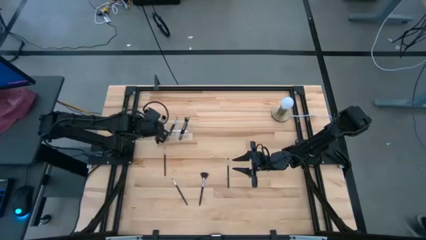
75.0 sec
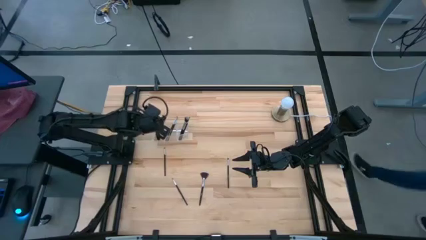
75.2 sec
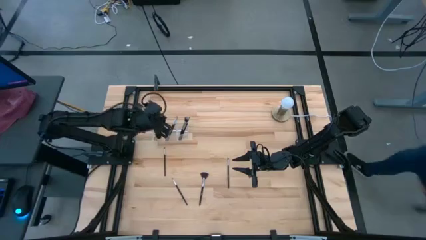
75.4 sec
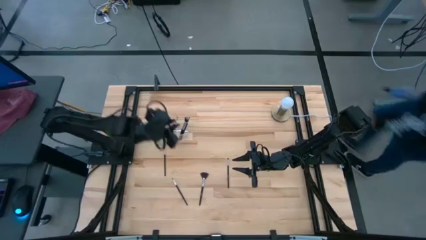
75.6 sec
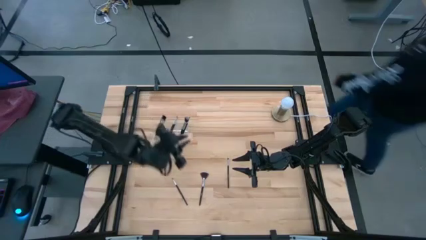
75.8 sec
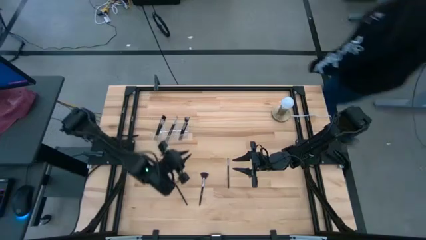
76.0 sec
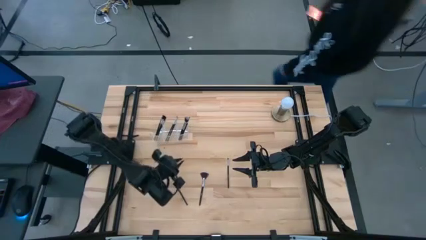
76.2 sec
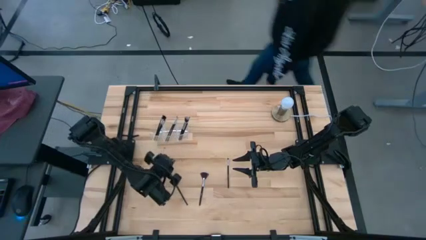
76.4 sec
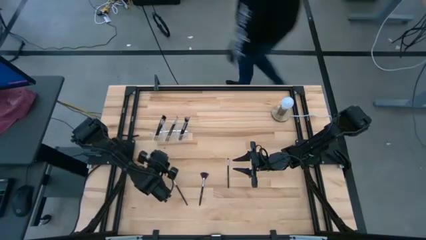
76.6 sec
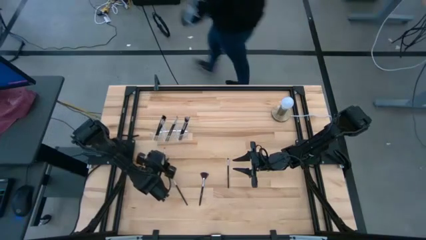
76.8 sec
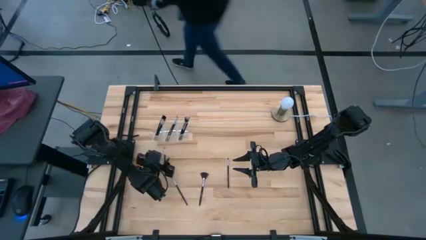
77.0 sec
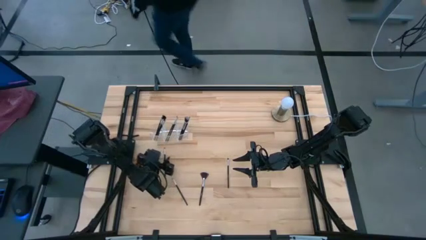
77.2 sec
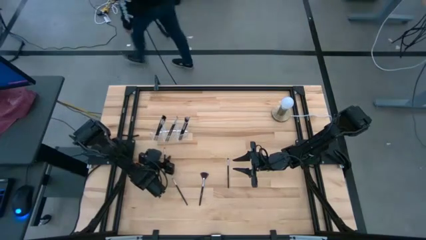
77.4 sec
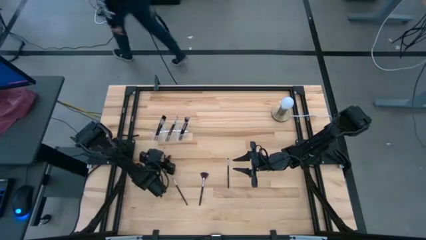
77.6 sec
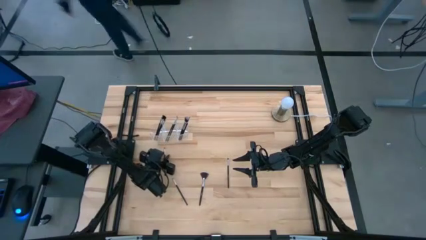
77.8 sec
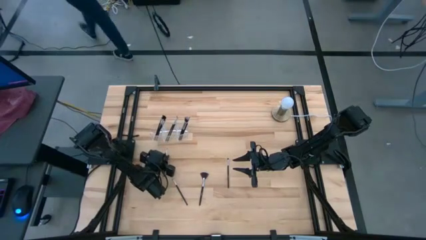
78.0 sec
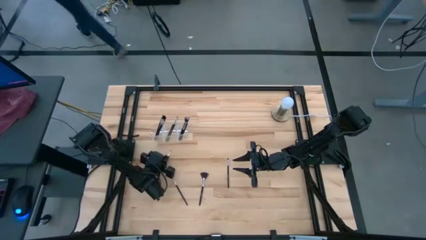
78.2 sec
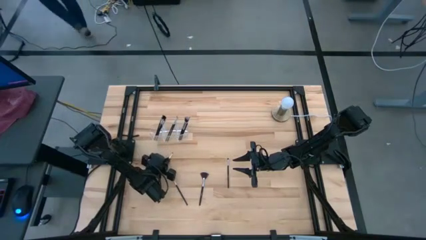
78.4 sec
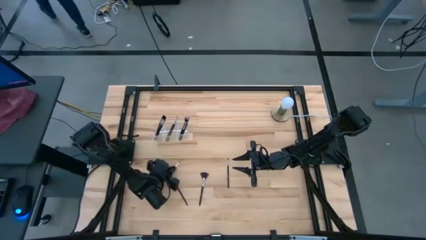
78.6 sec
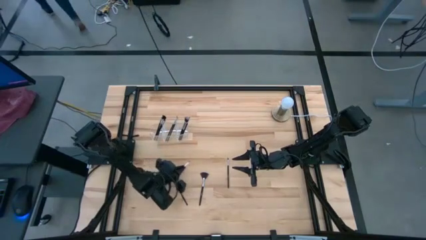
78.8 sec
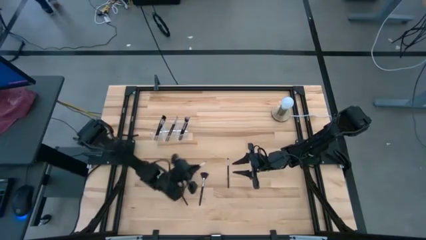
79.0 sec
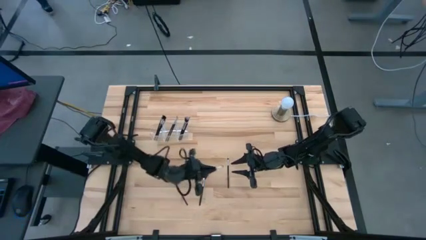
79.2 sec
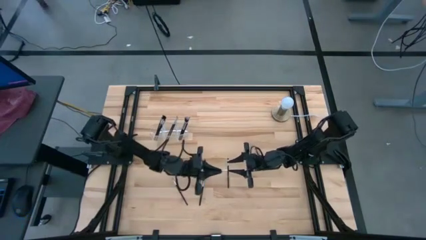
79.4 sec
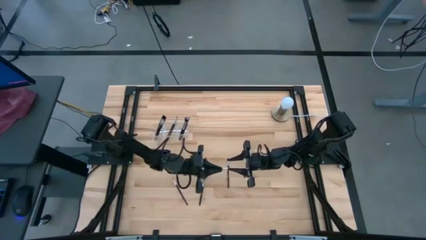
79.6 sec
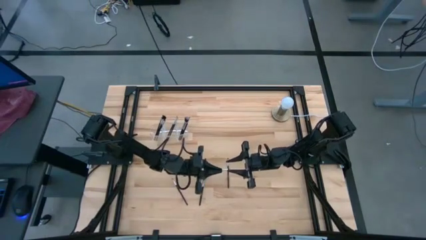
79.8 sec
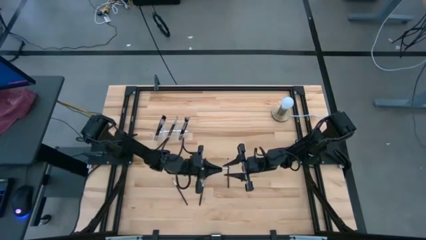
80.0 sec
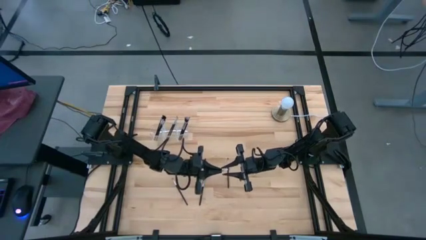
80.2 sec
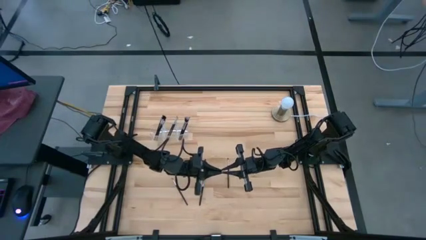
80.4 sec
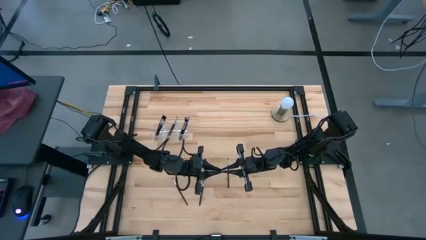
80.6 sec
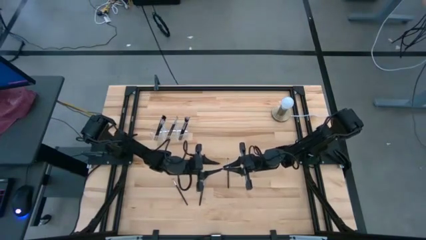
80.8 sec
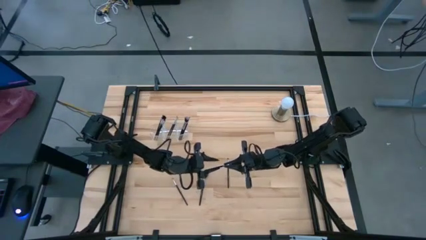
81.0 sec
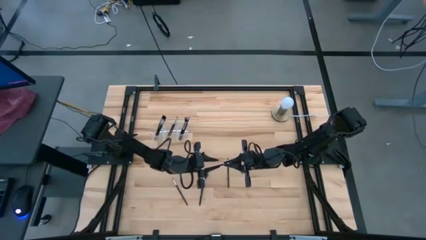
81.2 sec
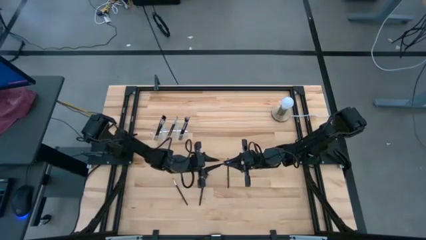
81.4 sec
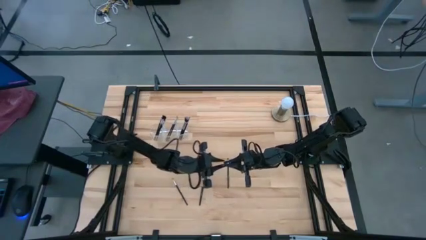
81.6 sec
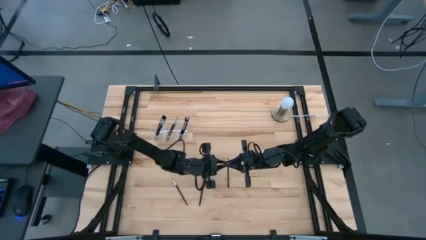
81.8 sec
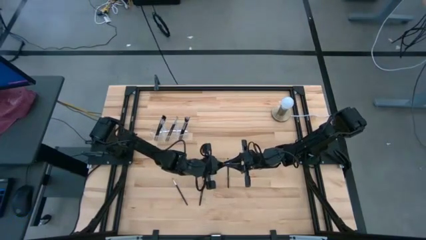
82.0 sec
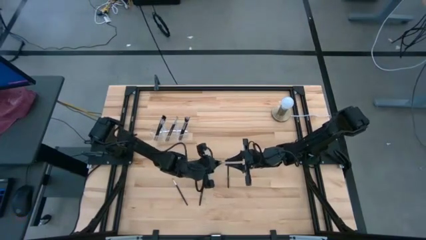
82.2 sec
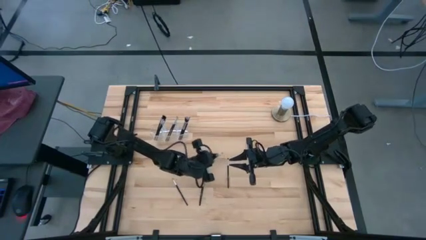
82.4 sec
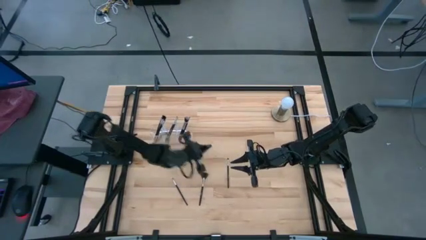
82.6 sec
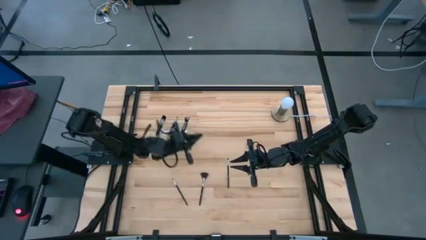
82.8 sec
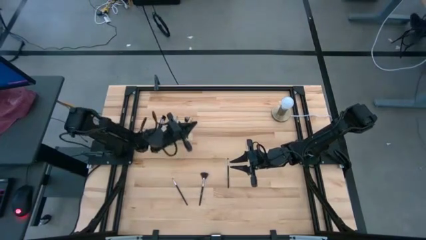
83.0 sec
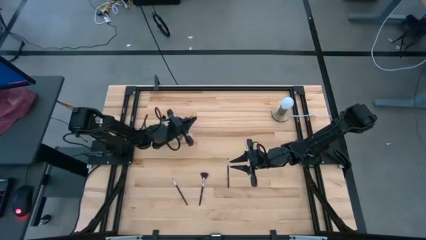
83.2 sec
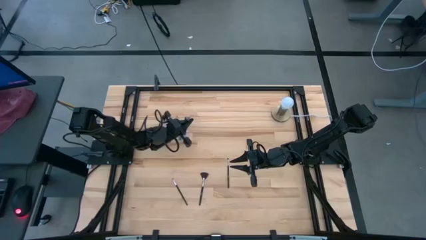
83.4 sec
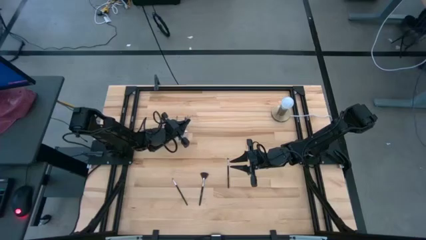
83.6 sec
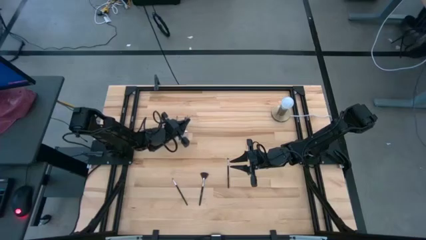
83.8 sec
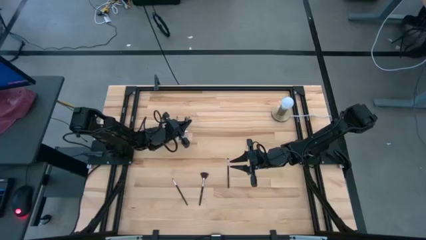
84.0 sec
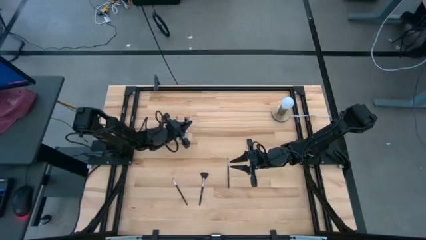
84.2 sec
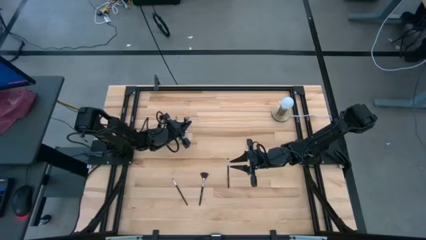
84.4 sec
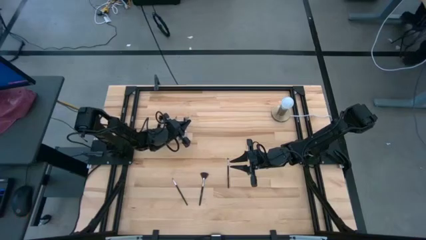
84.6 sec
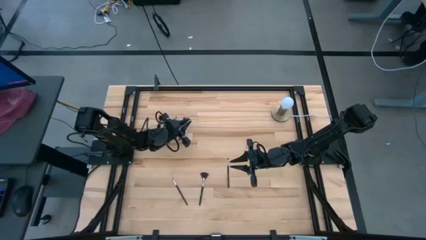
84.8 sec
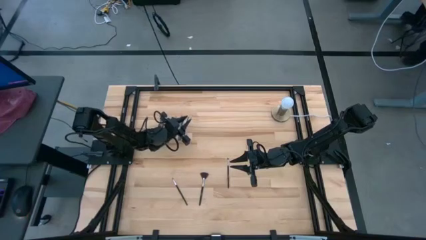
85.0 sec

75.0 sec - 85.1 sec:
Task: Pick & Place Makeup Brushes
Put the black eyeshadow brush into the transparent organizer

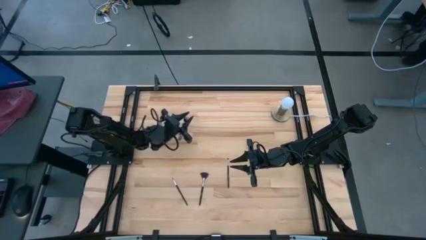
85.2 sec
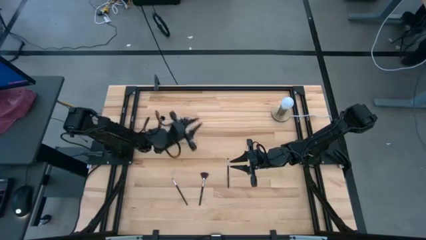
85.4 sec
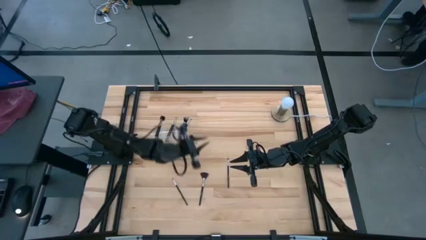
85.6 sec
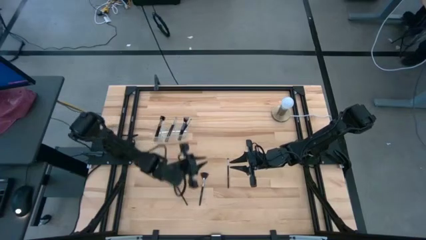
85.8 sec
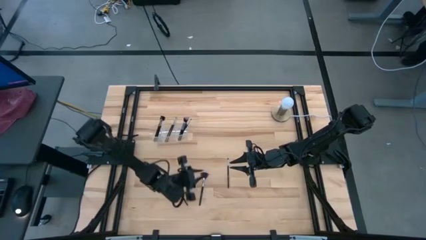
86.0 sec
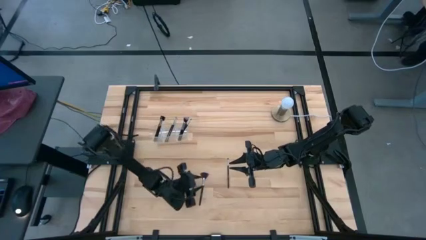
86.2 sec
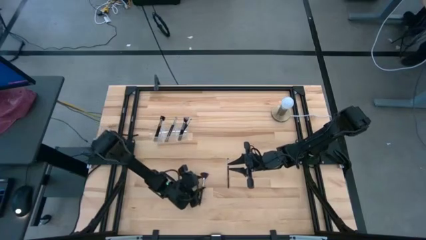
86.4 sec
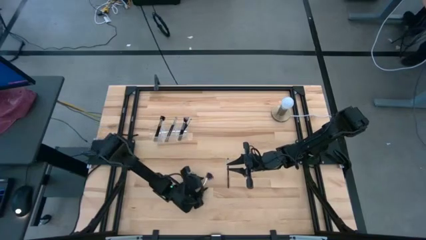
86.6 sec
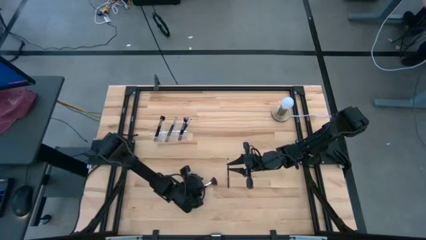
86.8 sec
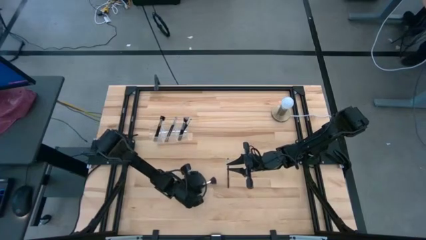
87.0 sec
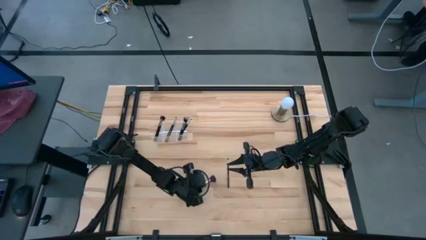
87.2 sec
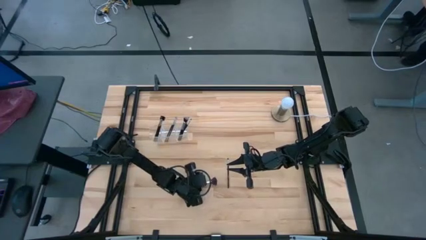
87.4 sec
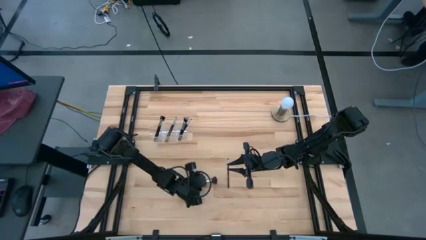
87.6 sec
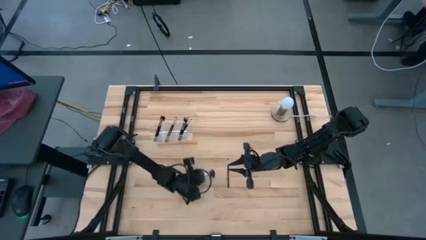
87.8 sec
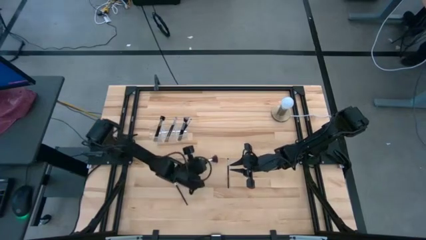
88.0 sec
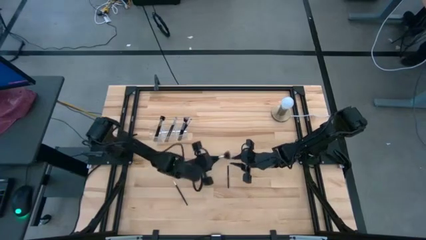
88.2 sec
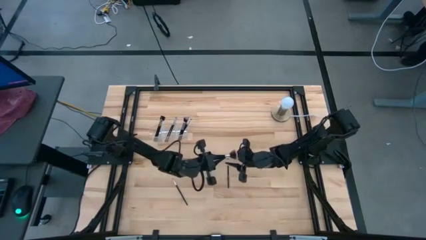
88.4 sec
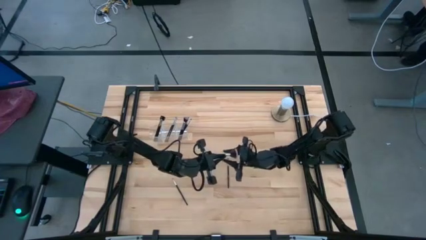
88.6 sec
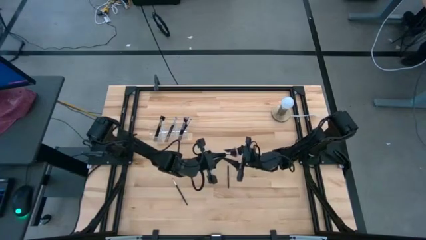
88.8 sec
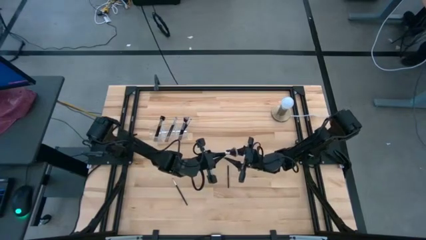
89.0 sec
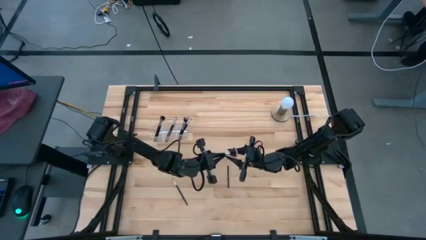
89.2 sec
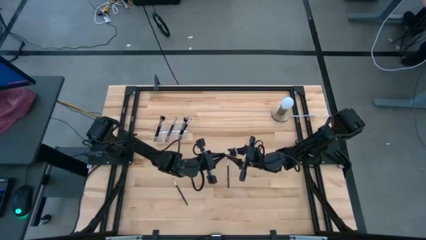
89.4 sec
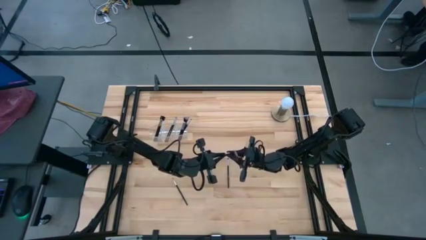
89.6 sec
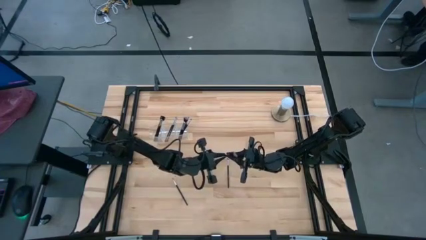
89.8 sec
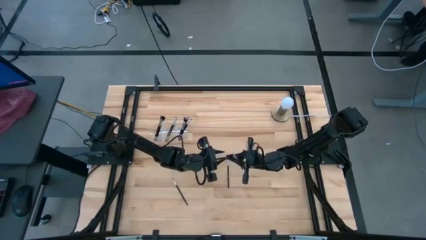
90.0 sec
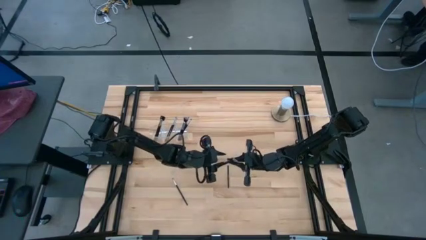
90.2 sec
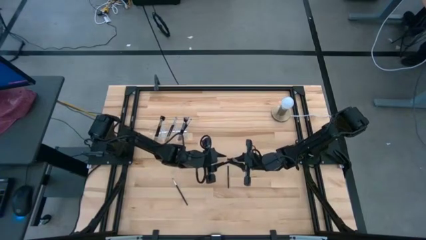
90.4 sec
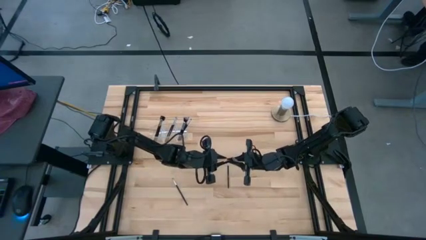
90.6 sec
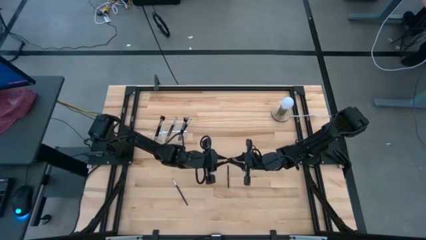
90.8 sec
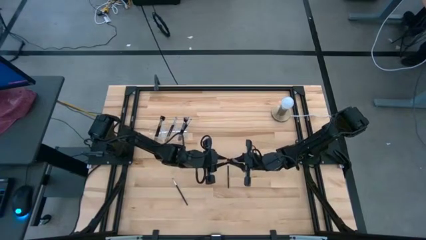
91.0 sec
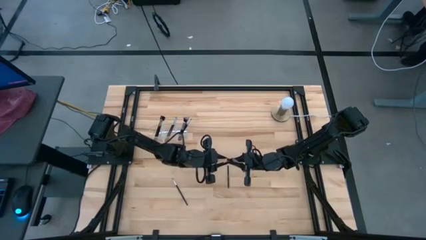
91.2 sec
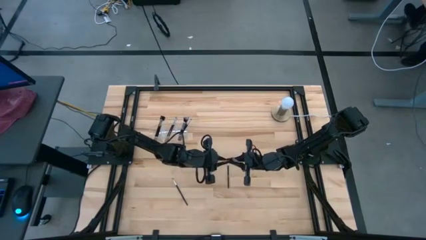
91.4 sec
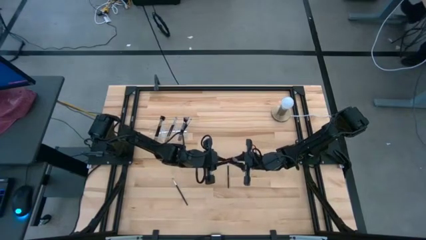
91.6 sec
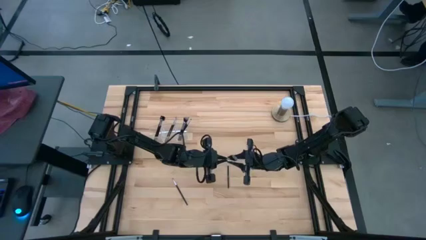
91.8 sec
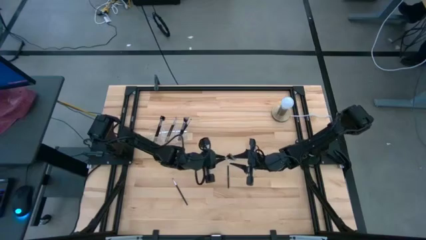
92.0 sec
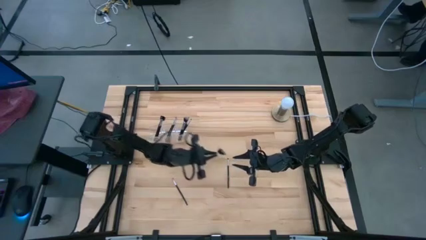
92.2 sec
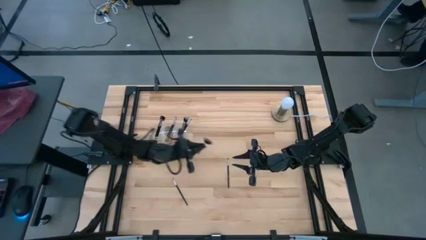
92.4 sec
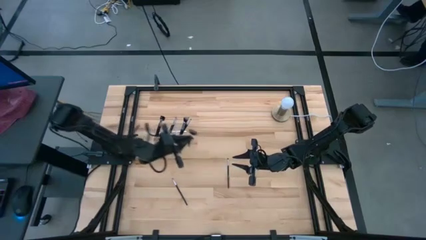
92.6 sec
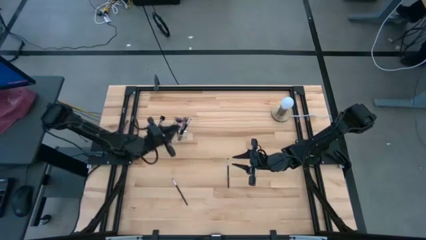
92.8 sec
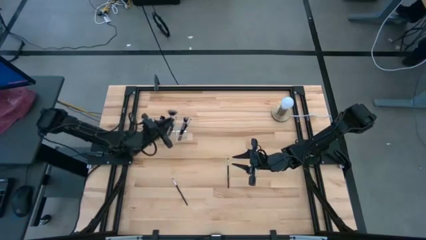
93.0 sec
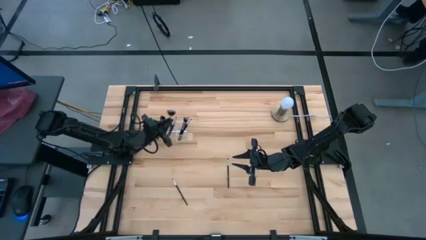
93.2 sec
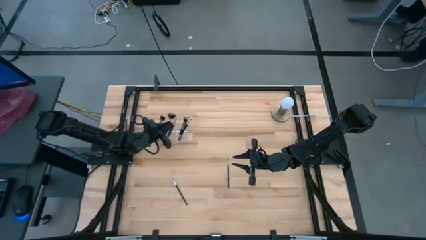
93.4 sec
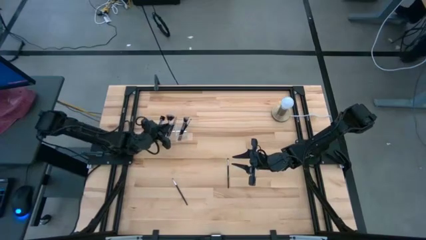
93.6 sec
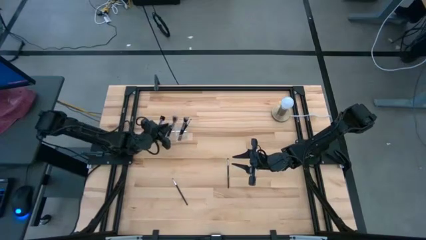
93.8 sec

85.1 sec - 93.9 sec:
Put the black highlighter brush into the transparent organizer
